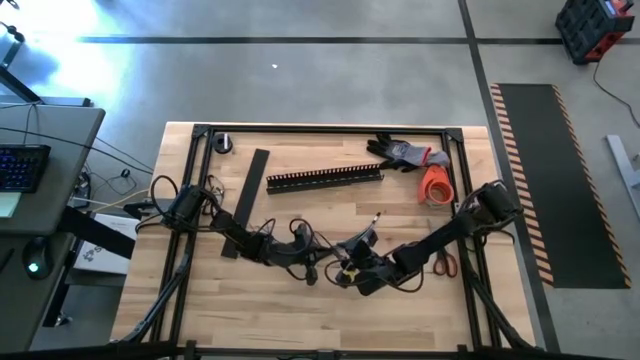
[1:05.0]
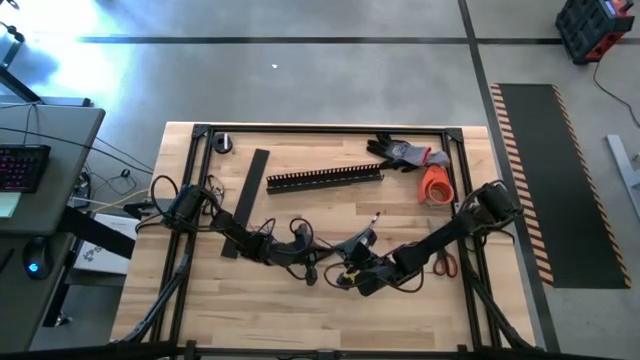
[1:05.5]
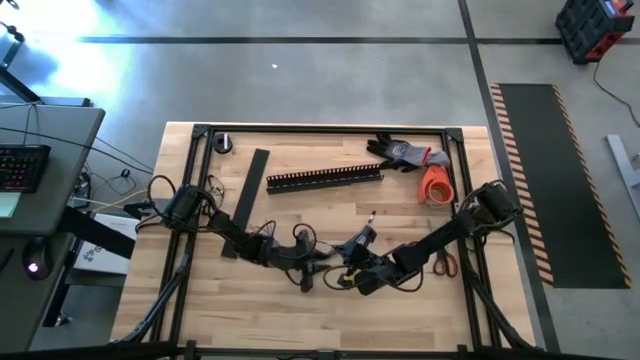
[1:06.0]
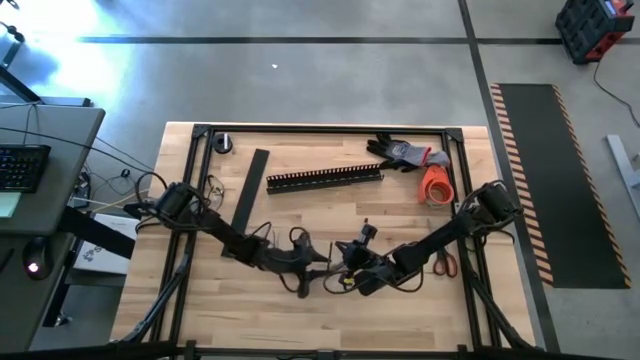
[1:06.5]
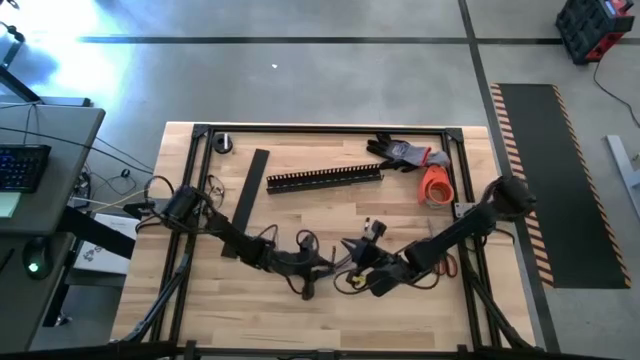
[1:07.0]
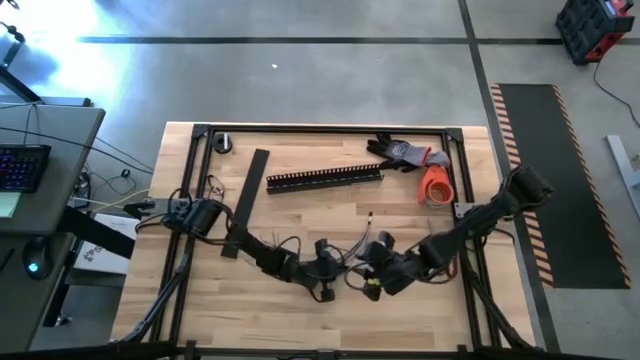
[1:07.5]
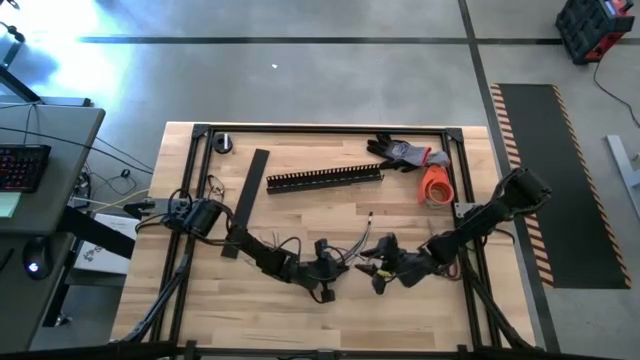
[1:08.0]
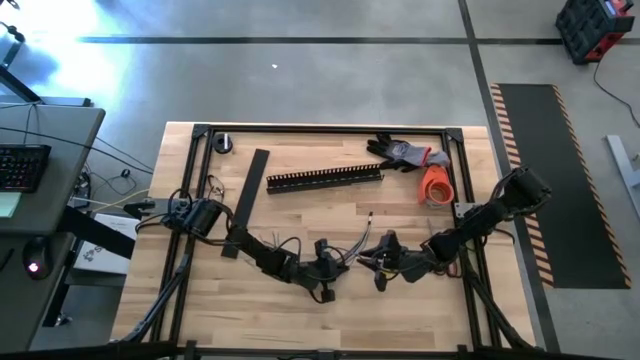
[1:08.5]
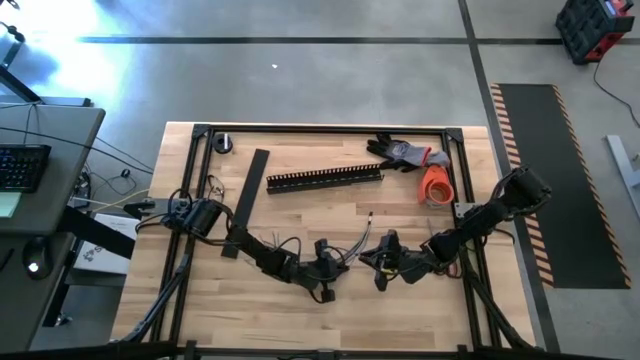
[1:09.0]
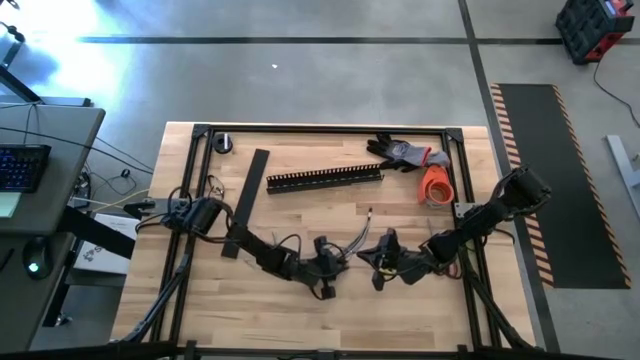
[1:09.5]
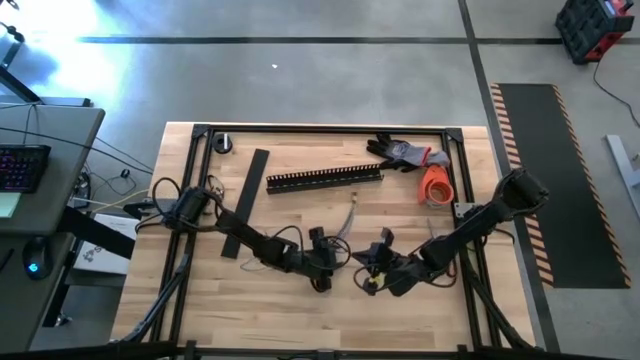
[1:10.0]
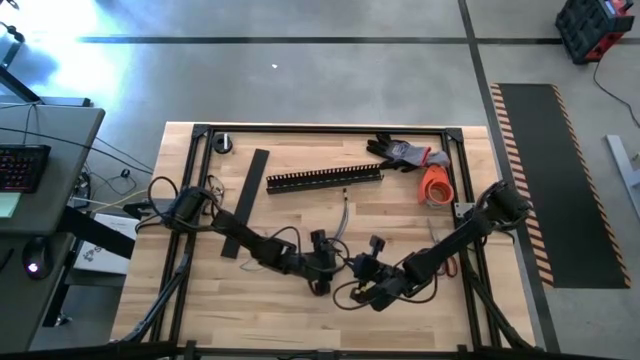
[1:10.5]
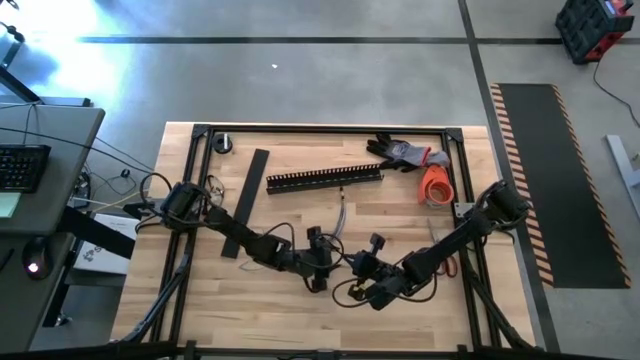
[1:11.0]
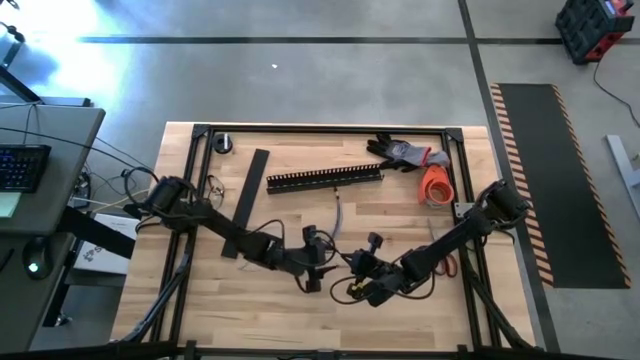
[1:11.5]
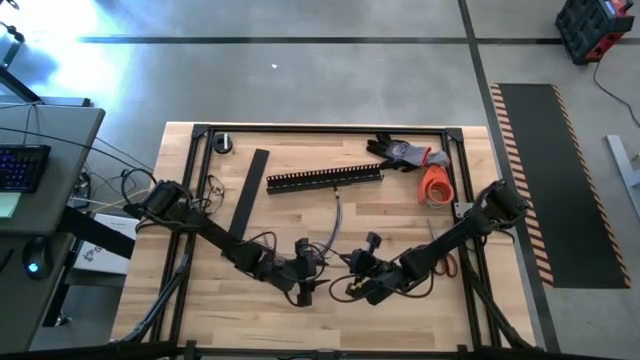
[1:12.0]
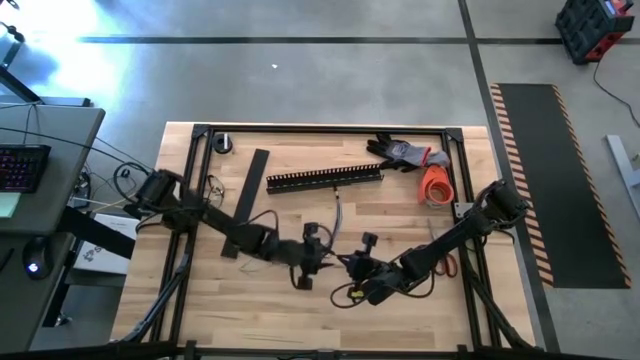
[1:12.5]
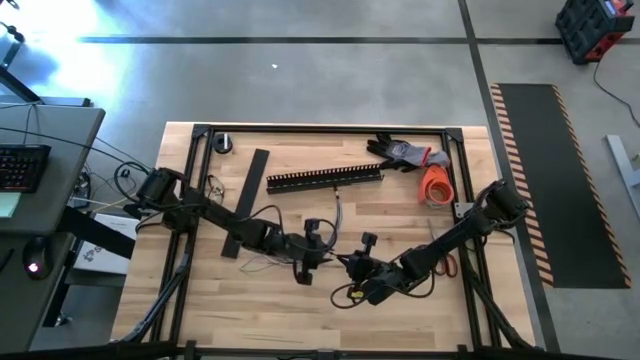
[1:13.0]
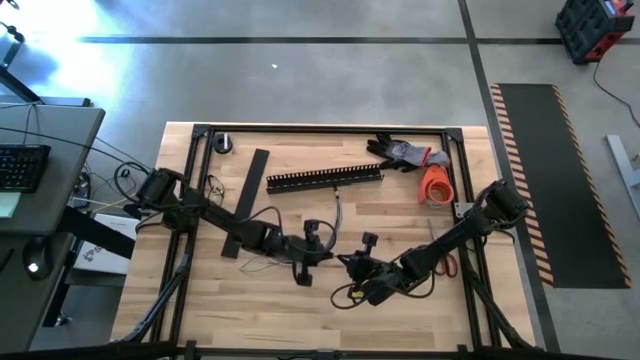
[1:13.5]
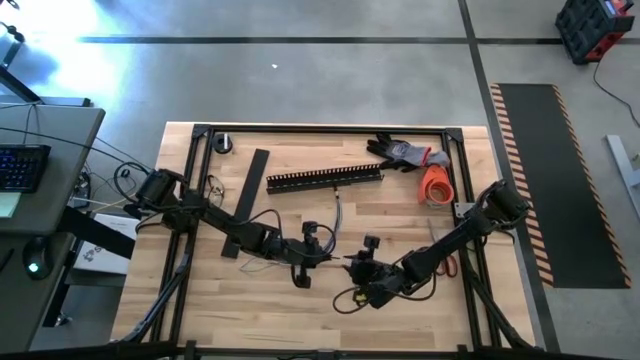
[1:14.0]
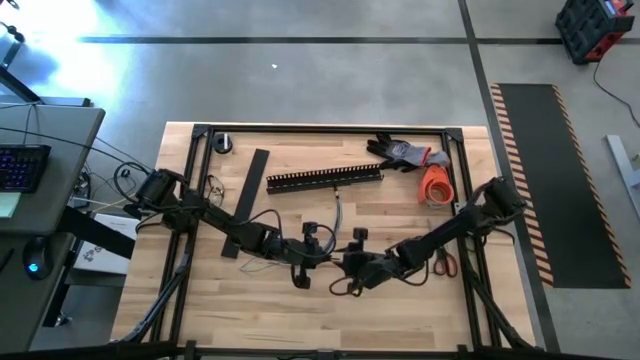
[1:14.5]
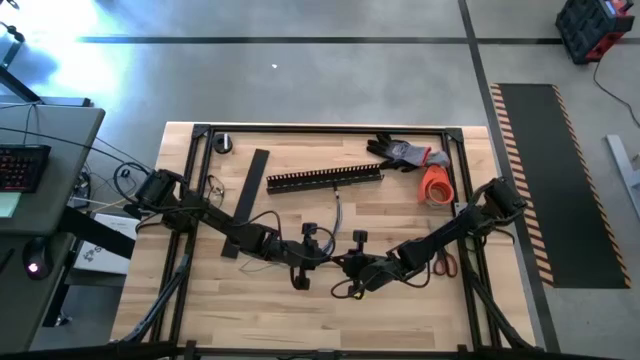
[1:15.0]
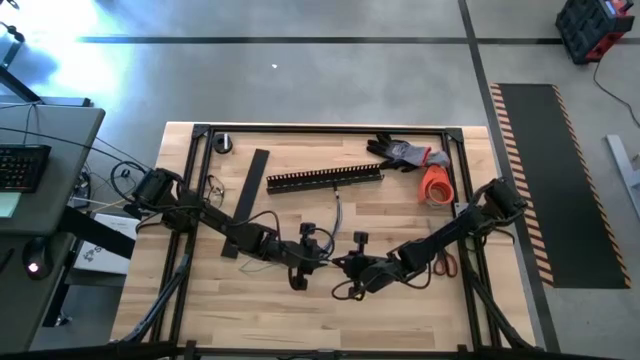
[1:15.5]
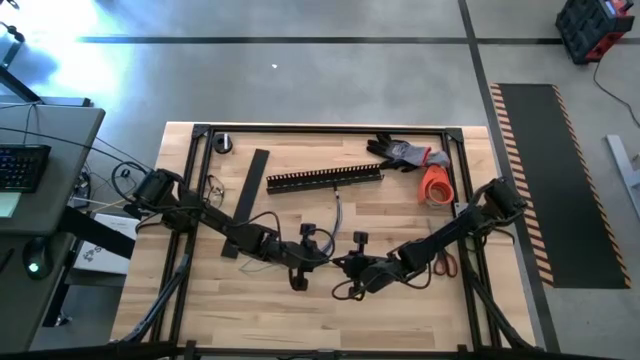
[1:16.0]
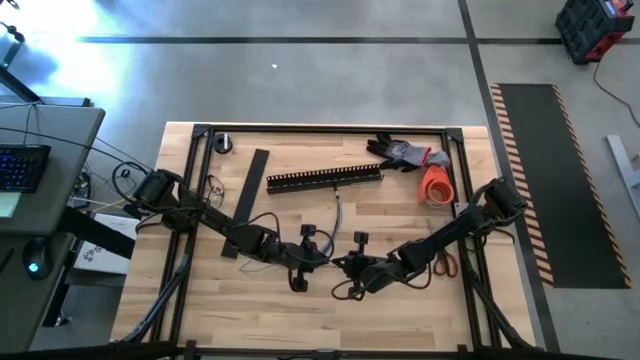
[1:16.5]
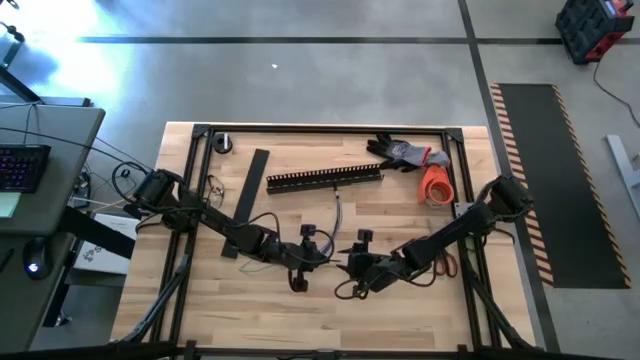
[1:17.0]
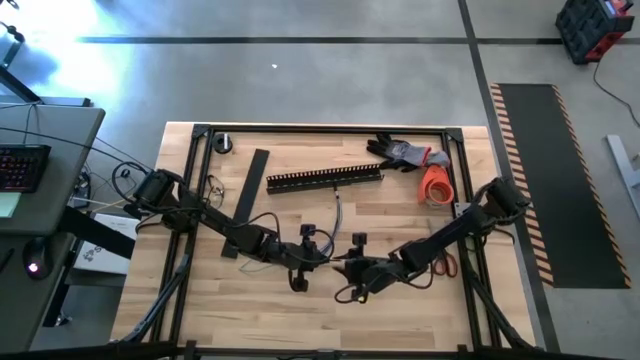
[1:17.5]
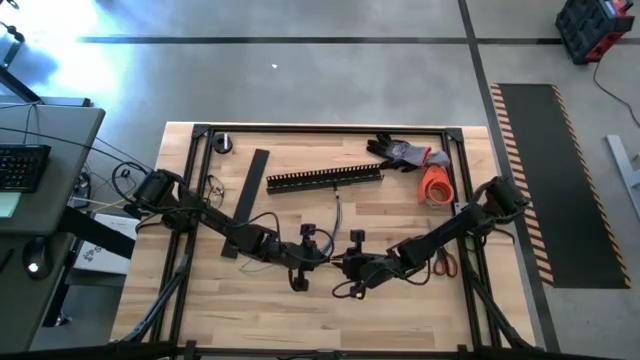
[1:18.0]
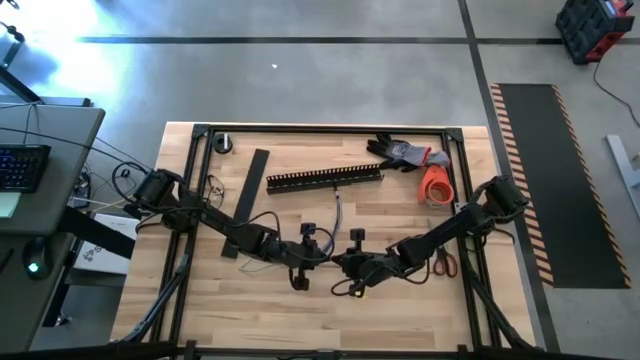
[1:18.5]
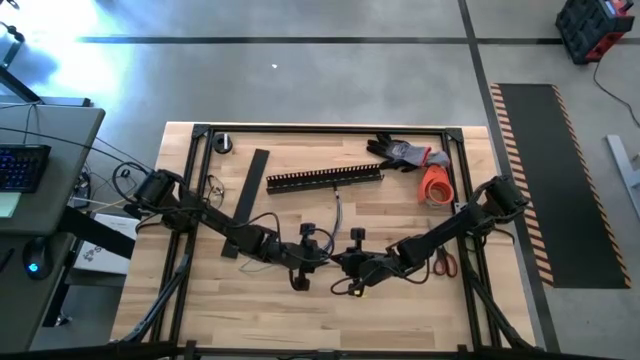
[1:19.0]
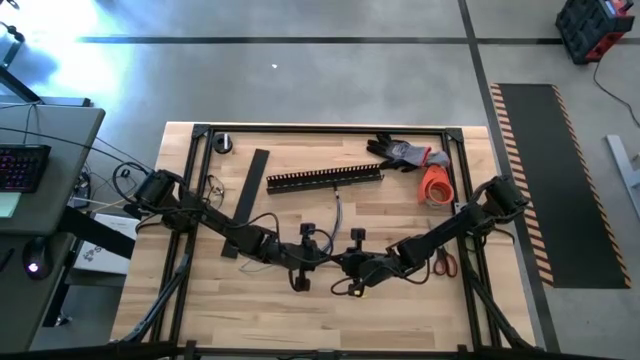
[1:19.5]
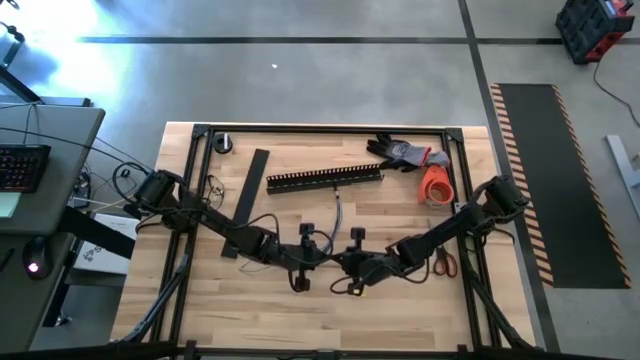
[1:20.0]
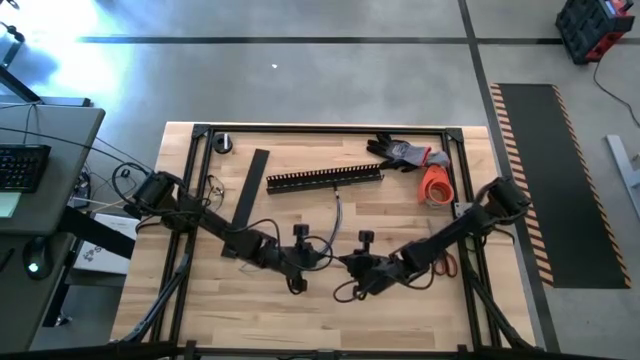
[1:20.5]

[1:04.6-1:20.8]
Task: Ziptie cables
Wrap the cables together using a zip tie

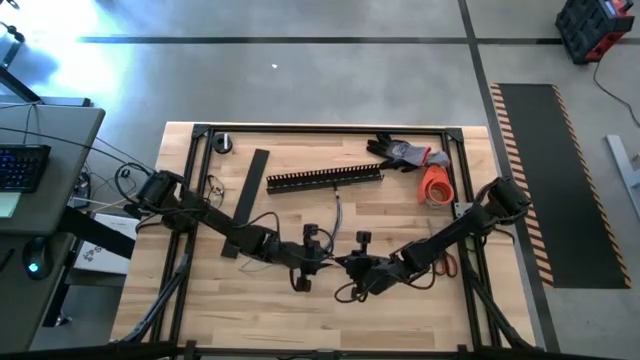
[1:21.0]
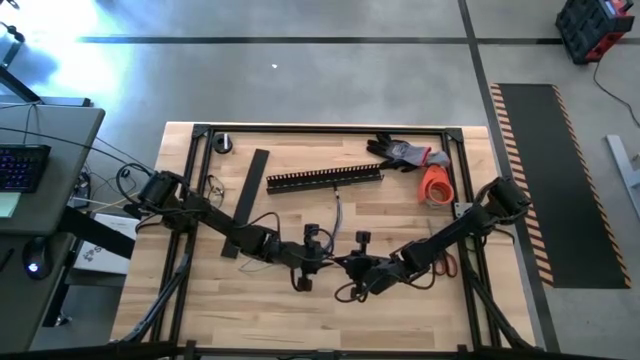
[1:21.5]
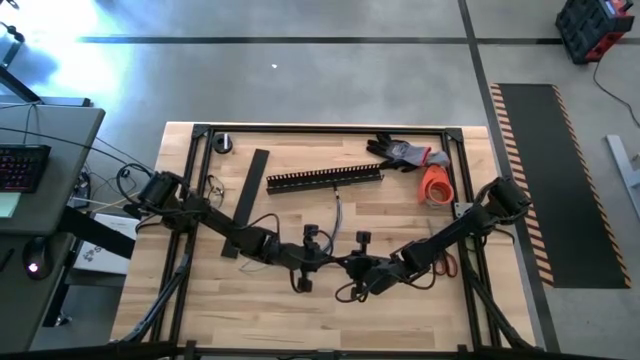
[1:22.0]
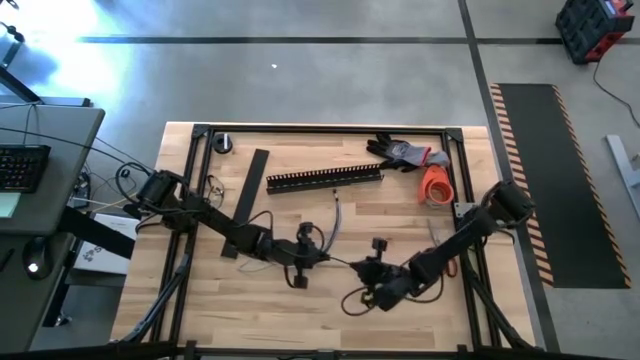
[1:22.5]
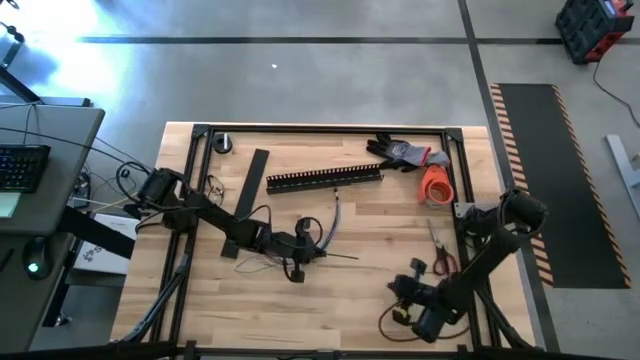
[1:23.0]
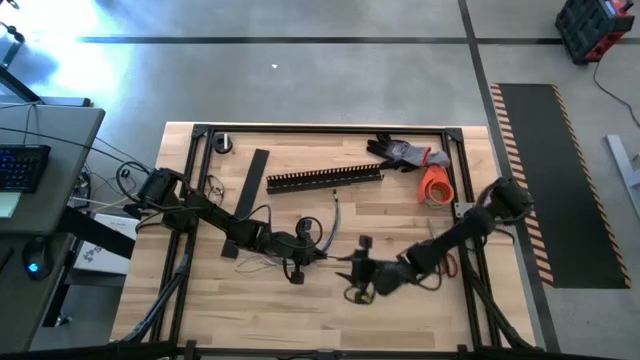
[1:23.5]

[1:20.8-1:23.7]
Wrap the cables together using a zip tie

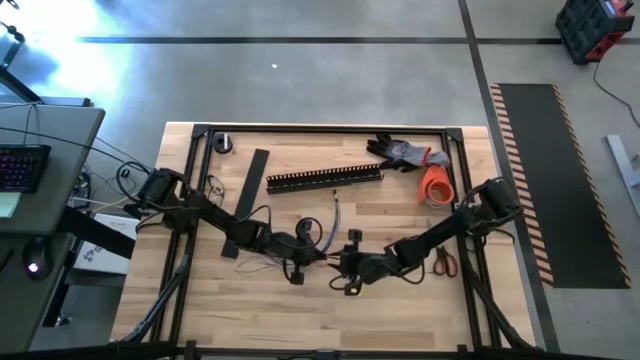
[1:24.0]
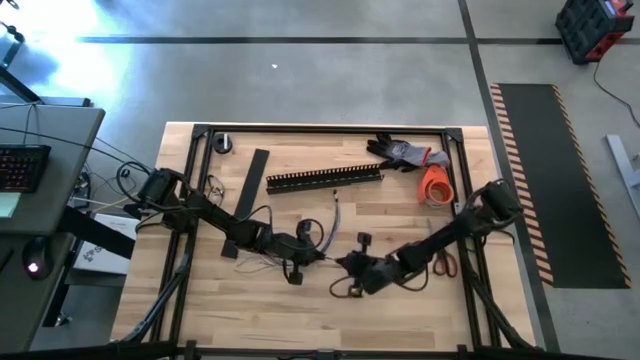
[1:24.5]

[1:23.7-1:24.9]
Wrap the cables together using a zip tie
